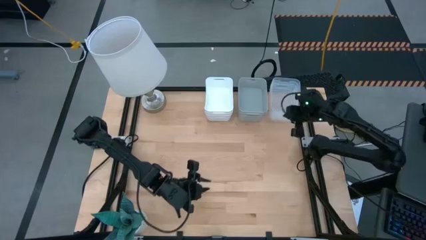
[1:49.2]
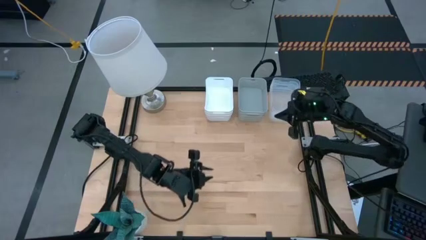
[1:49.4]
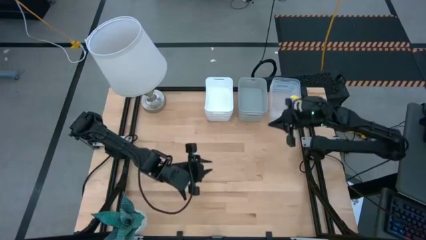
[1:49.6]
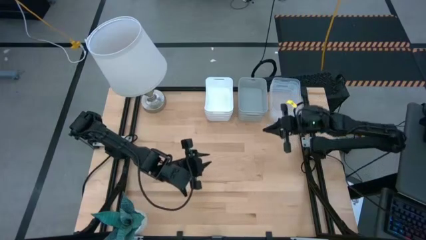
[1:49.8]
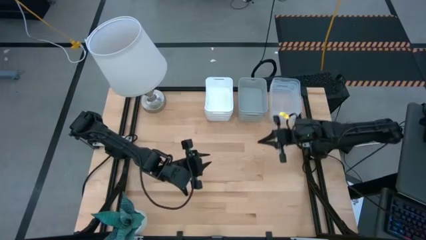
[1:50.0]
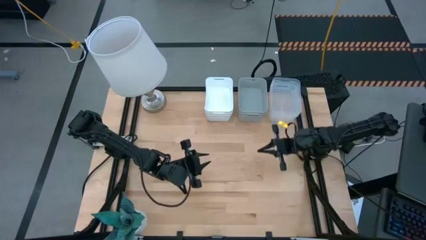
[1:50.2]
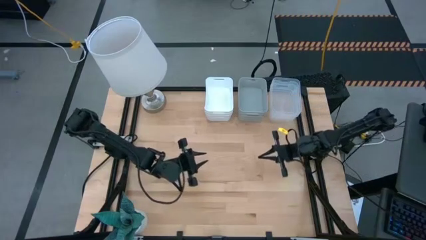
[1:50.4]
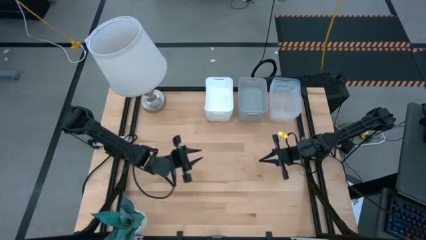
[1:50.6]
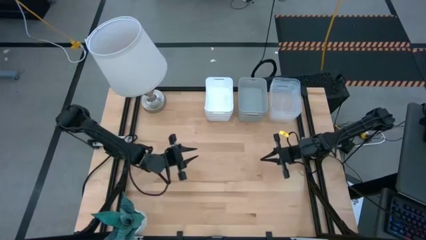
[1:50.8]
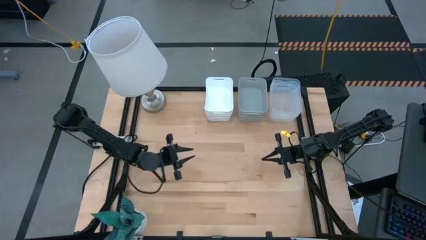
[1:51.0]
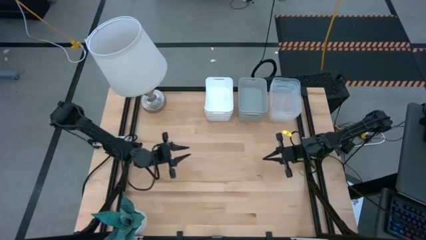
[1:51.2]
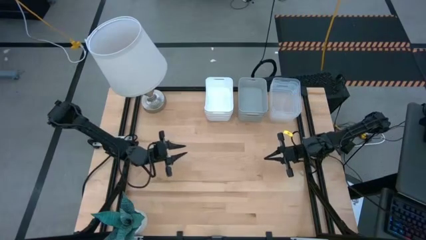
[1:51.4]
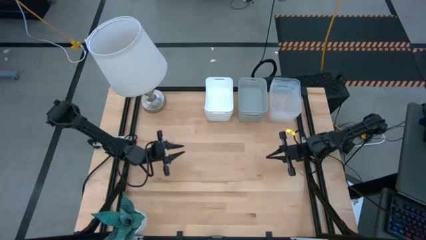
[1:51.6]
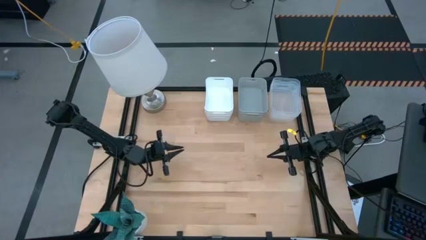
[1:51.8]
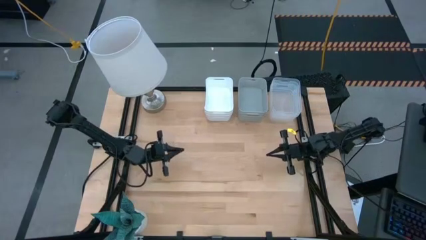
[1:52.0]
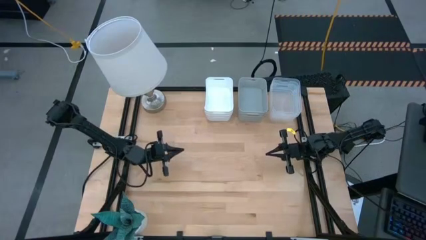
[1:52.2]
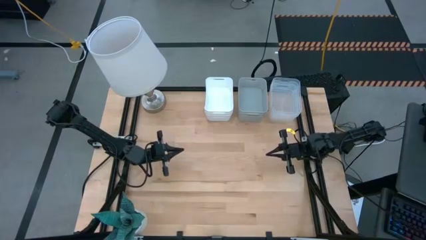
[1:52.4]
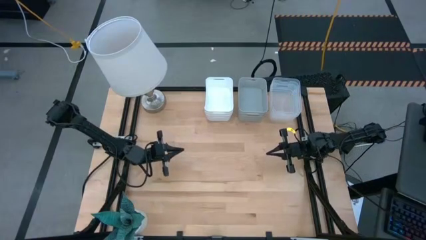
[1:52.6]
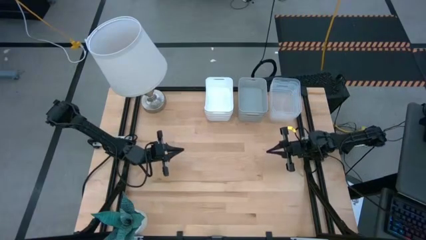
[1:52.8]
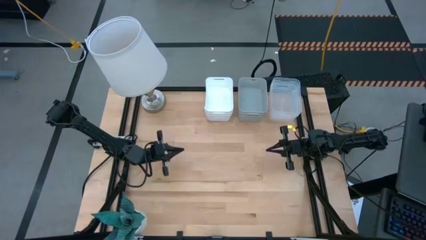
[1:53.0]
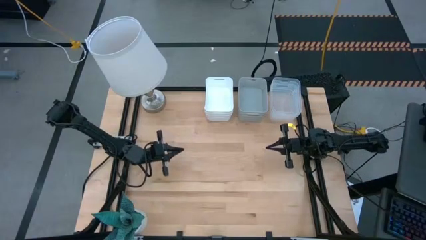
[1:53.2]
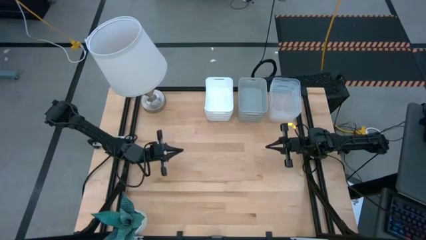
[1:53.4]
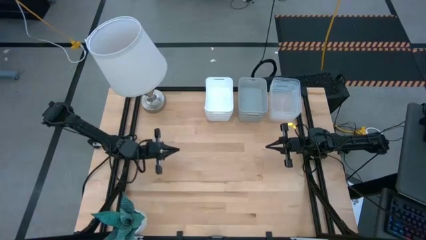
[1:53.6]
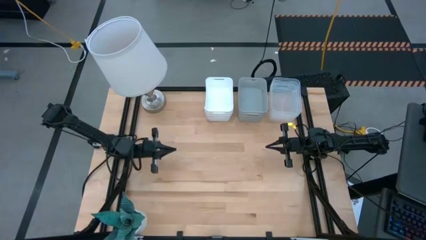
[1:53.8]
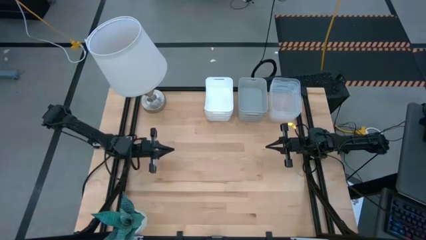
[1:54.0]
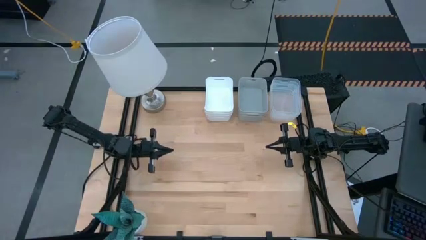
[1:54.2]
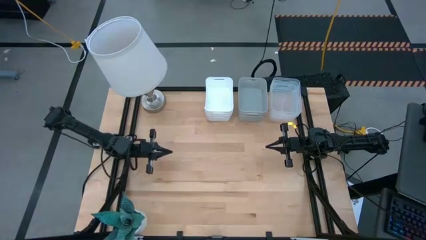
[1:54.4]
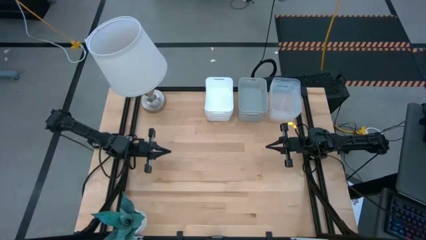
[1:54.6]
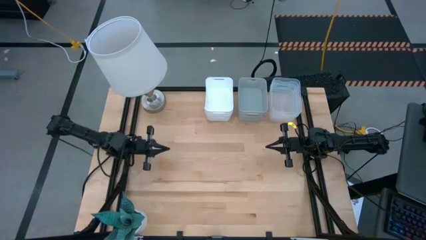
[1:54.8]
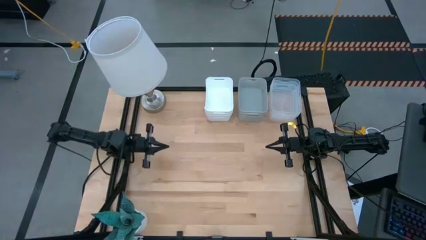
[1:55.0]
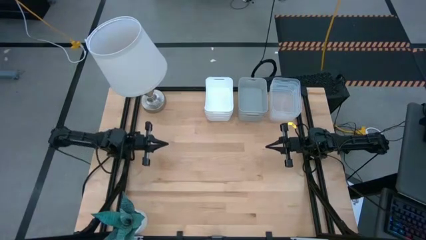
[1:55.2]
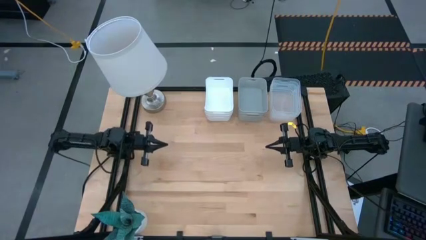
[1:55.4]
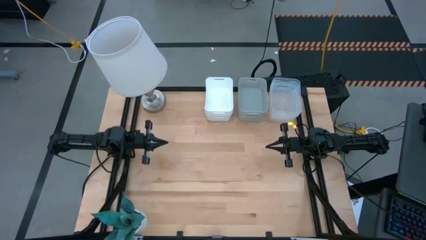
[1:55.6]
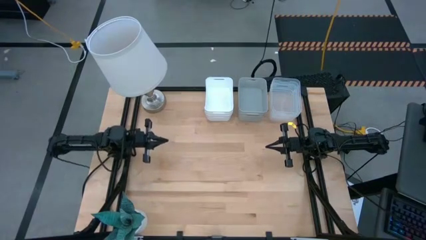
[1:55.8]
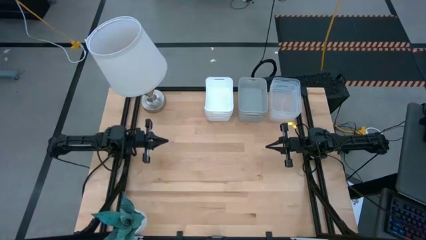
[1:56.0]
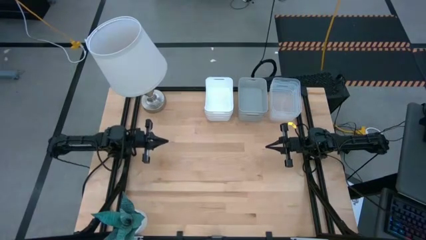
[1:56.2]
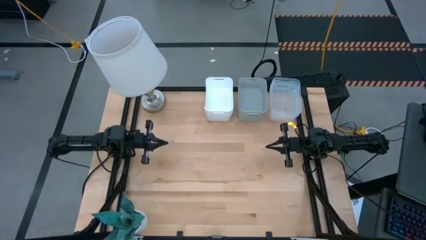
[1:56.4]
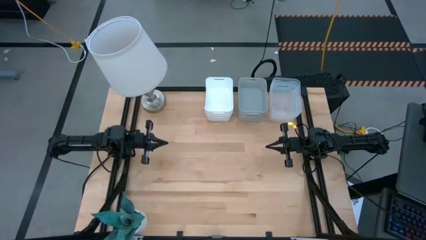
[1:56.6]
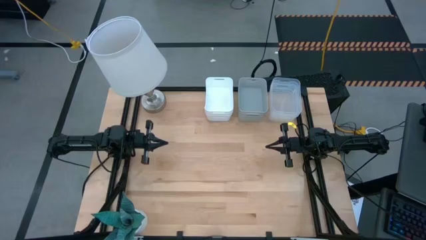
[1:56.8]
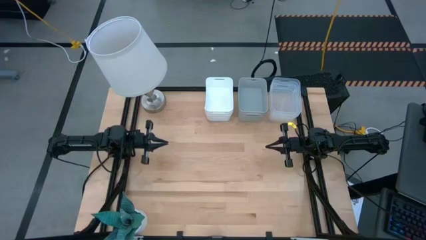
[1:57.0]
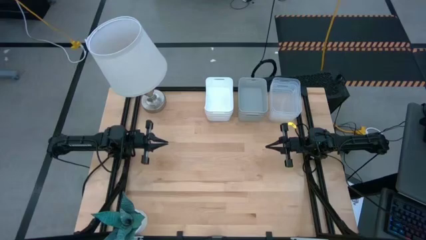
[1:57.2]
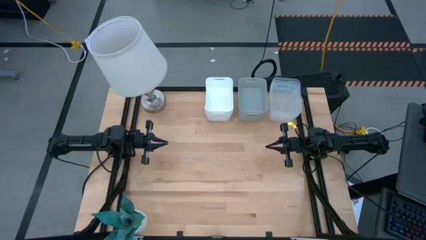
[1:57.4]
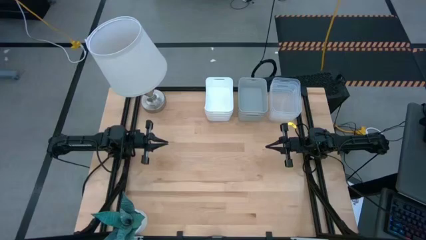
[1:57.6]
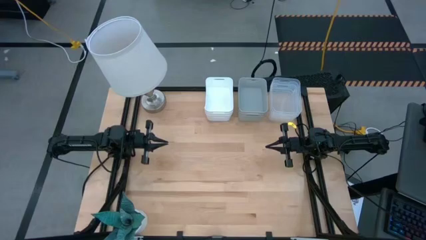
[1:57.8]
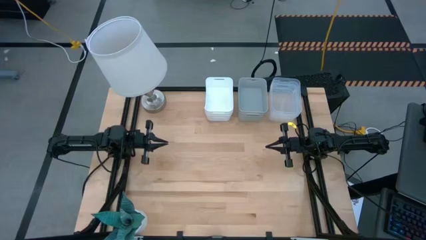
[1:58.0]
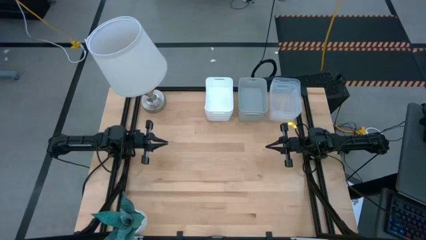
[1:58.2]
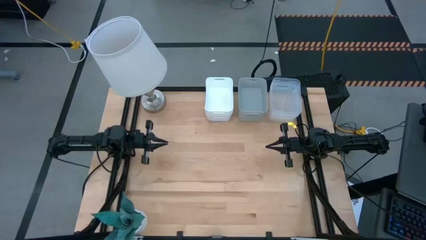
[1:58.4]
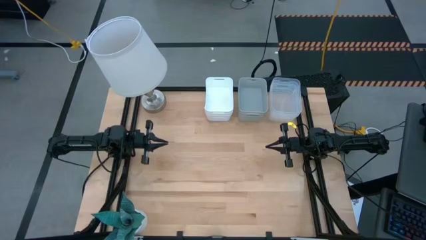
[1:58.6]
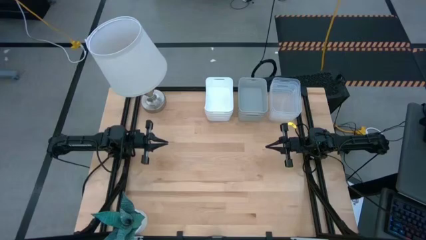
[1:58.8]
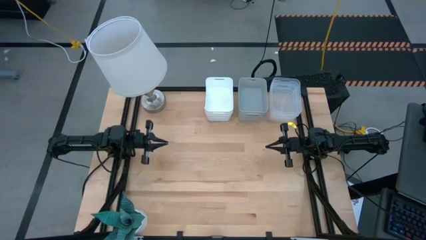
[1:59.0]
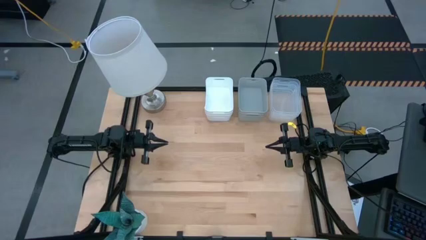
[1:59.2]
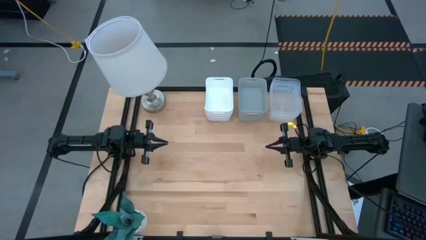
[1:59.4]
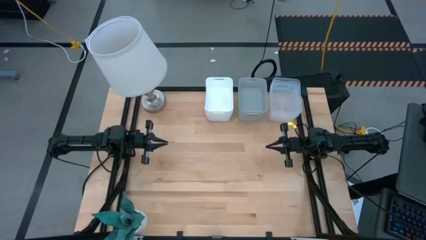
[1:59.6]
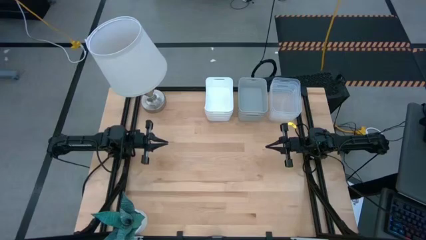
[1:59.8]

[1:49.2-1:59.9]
Return to Home Position
